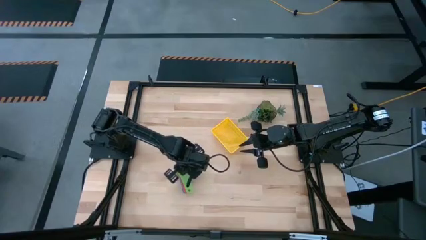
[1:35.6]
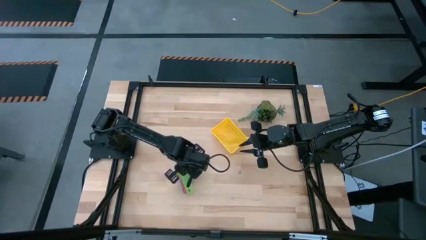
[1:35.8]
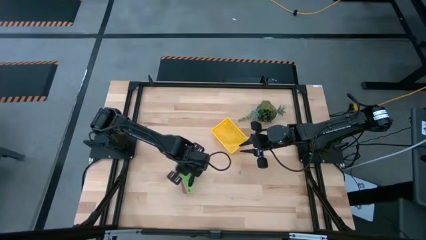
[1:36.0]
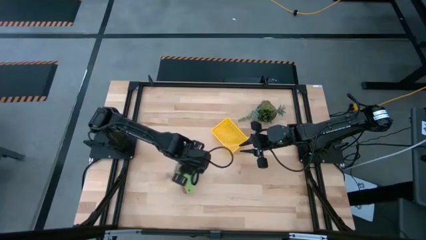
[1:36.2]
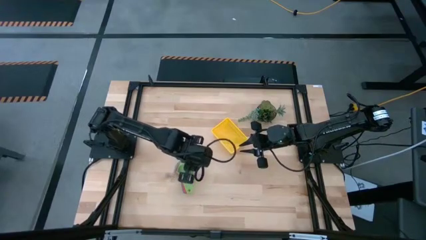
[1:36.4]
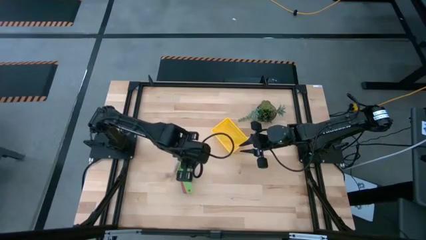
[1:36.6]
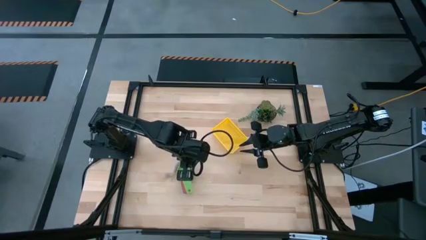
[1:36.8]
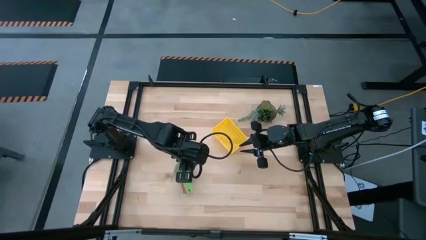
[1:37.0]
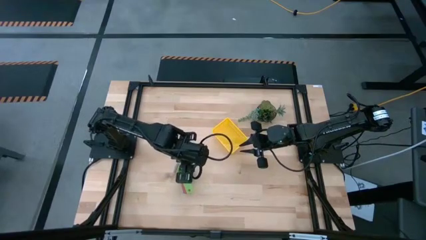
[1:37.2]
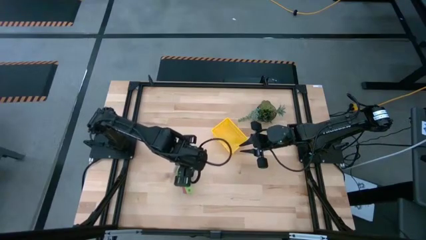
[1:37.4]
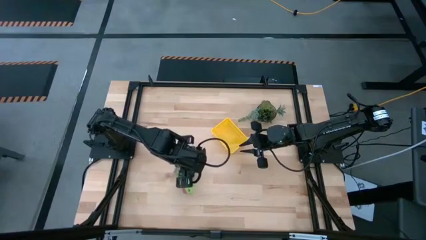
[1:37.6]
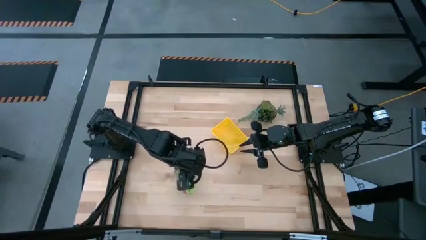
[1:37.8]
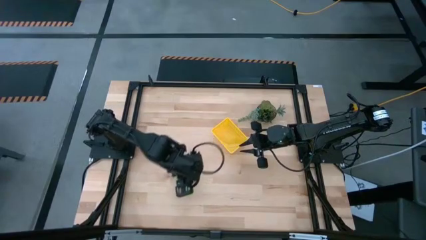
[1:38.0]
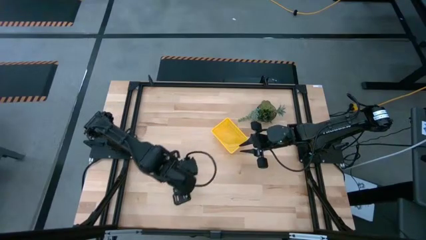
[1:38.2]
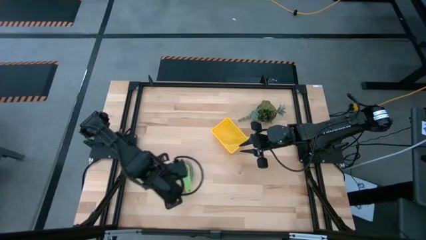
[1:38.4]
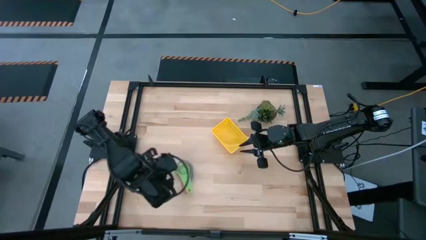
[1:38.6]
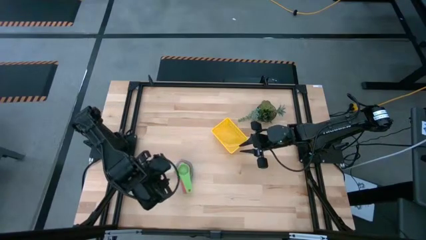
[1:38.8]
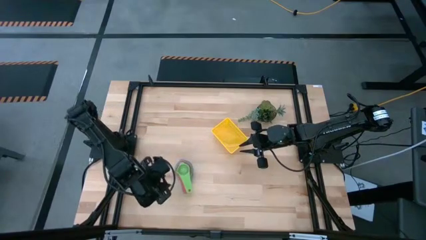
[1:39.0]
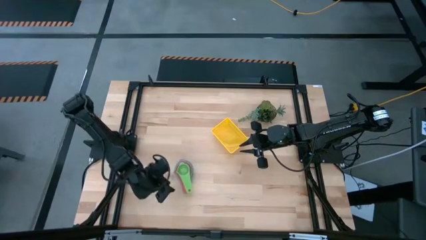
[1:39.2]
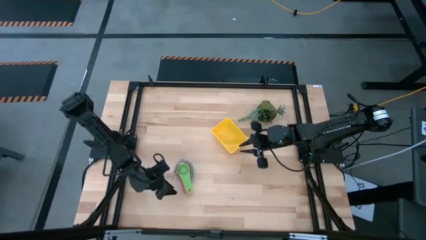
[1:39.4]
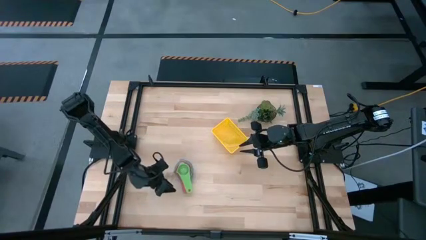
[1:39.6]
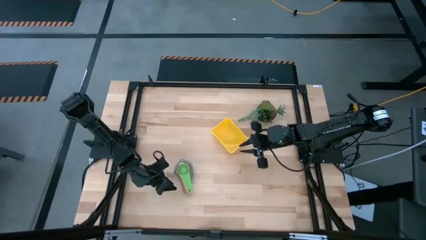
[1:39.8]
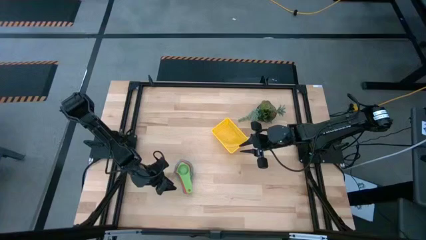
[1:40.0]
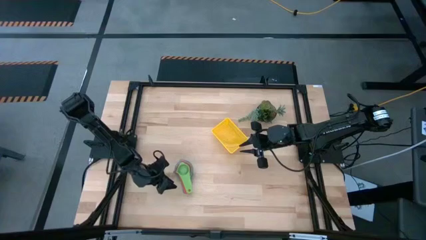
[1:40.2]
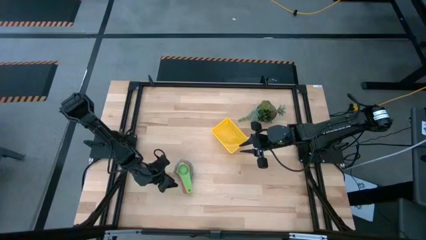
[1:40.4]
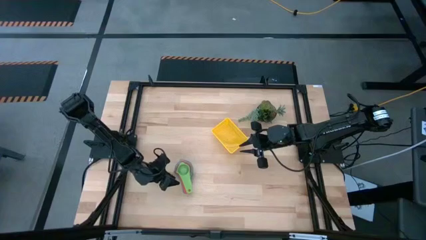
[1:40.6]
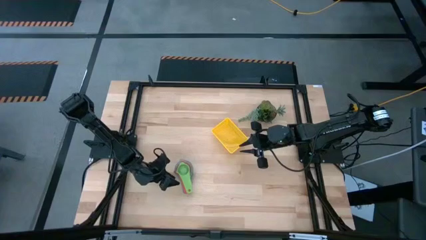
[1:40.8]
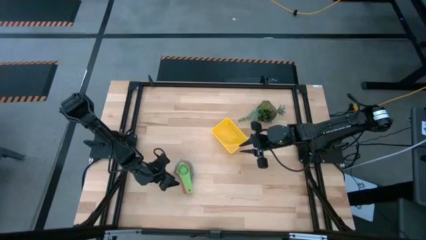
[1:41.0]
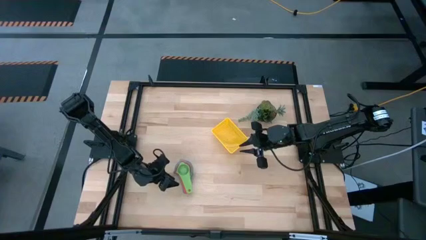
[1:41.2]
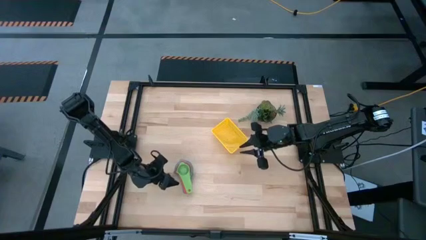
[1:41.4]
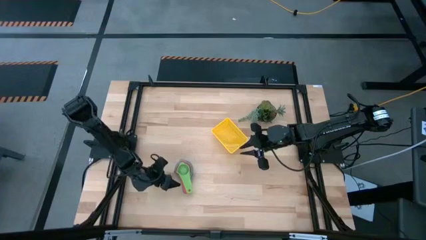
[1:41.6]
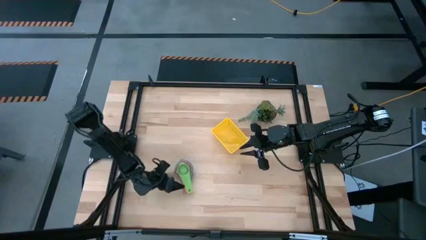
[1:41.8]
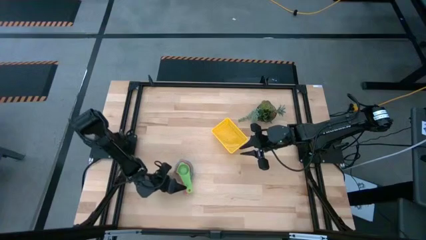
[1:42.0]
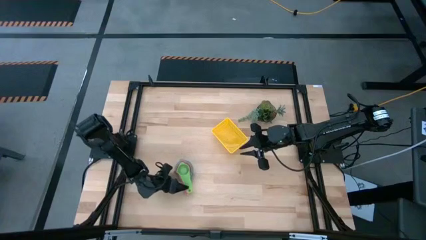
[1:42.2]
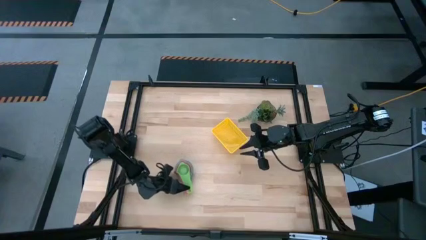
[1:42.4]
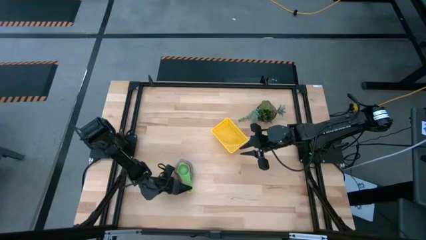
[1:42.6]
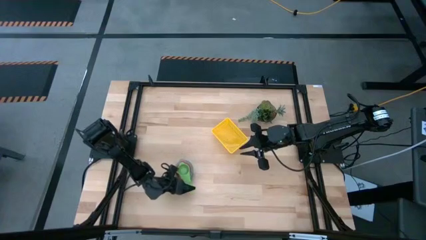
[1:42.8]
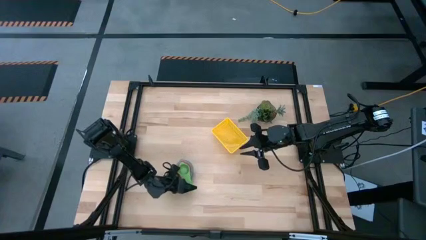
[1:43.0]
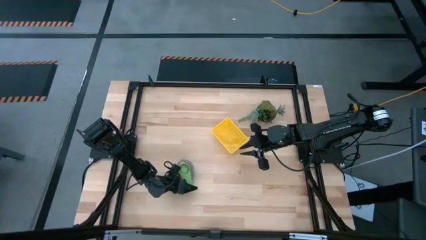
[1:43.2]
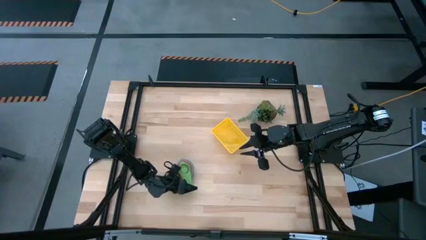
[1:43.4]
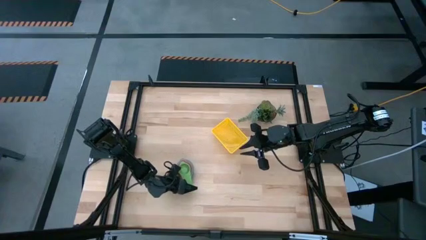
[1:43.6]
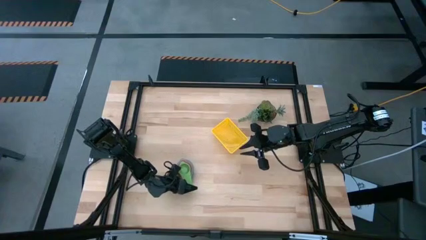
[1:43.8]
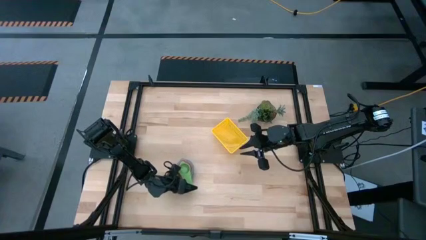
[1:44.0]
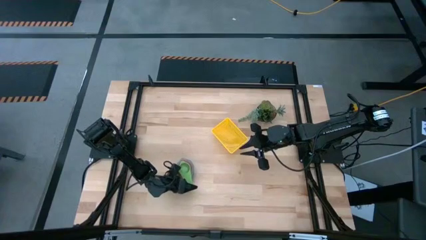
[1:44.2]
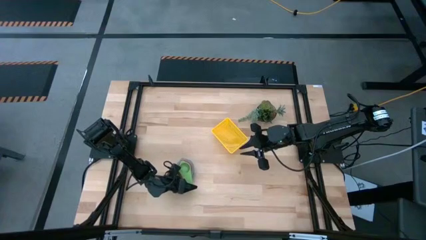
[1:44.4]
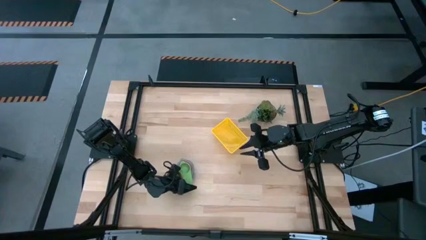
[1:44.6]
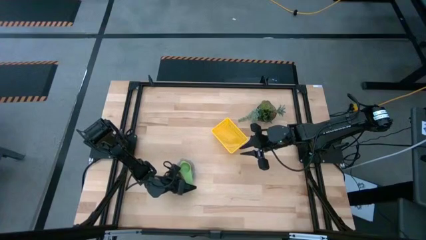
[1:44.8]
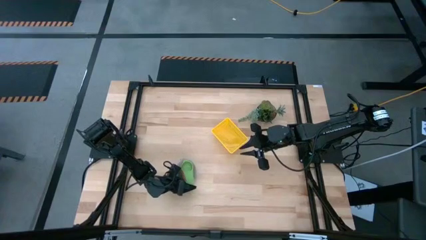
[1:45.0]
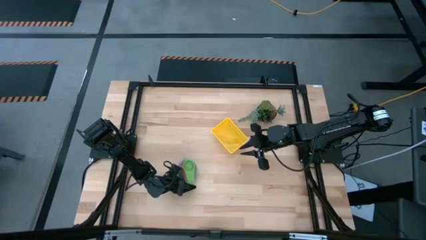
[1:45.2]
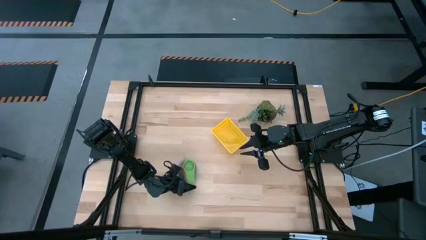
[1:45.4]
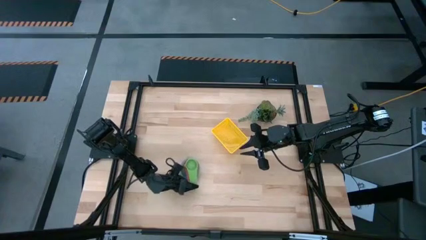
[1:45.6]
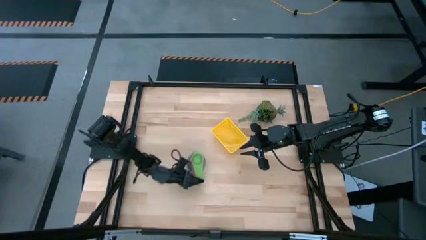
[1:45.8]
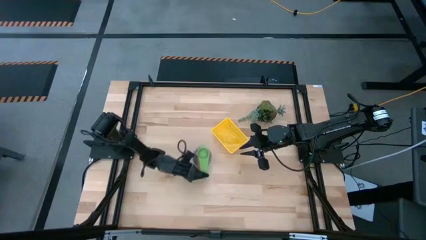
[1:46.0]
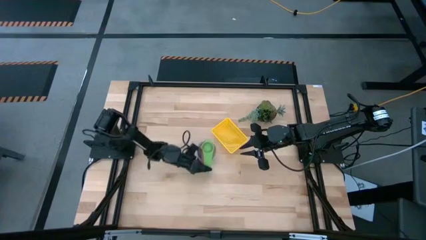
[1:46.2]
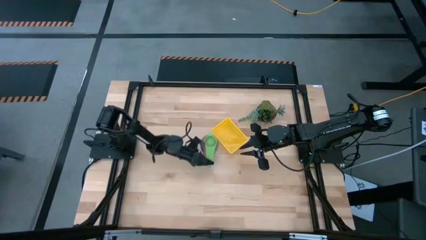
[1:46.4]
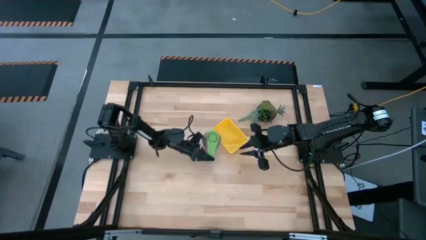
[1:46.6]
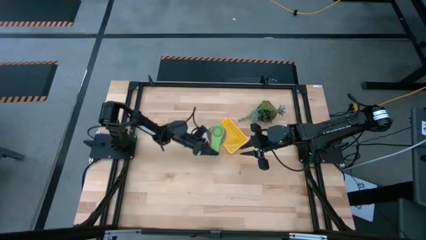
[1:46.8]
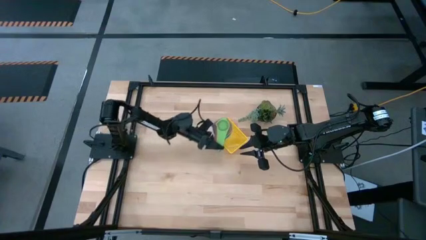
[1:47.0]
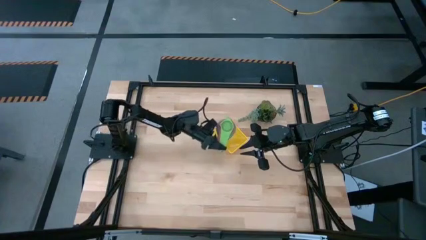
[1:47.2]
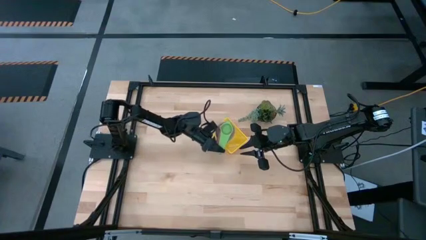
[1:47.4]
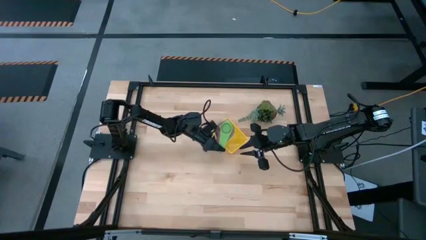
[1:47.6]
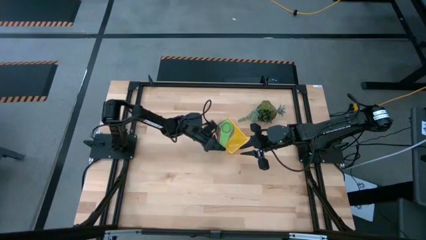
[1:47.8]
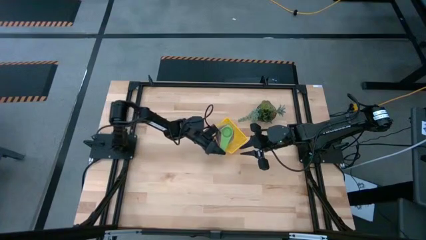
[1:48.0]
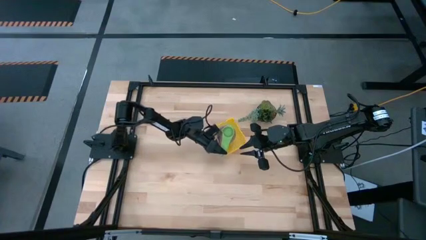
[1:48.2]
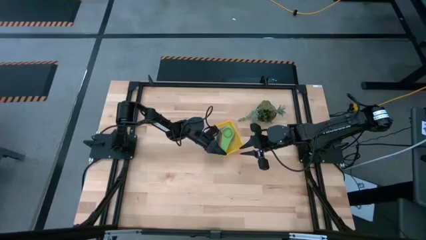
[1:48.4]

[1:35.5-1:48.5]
Task: Nest measuring cups in basket
Put the stacked measuring cups into the yellow bin

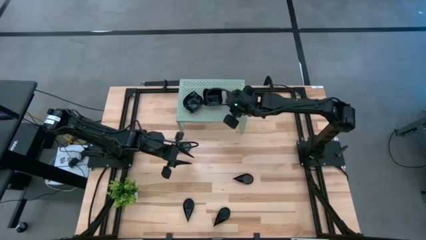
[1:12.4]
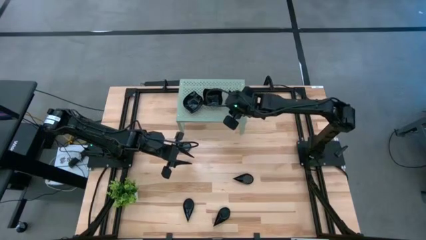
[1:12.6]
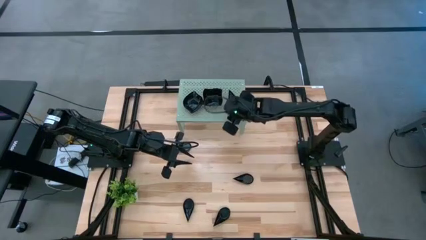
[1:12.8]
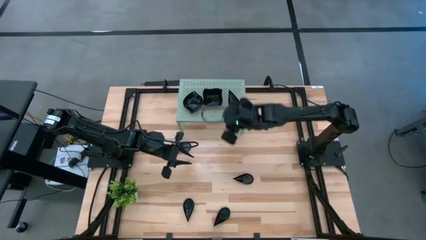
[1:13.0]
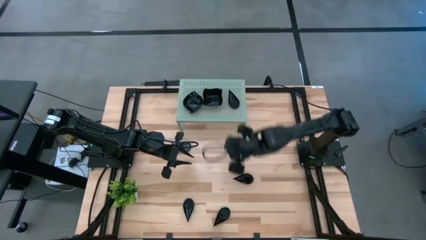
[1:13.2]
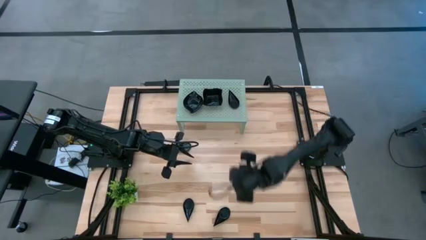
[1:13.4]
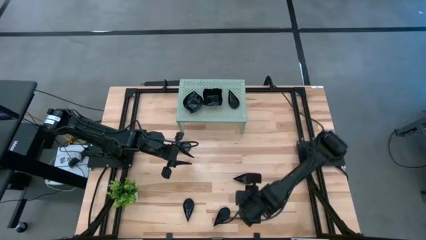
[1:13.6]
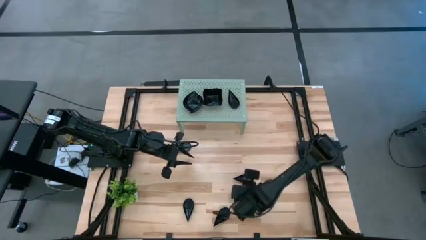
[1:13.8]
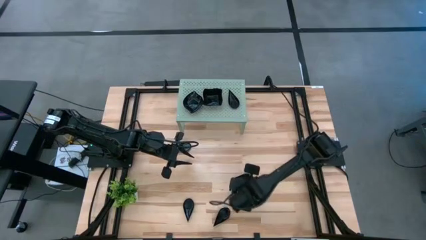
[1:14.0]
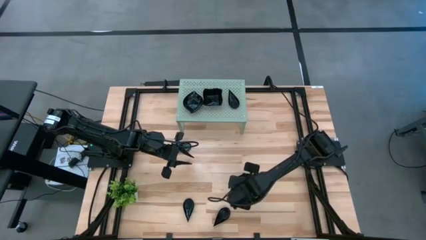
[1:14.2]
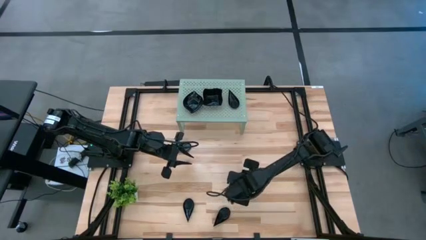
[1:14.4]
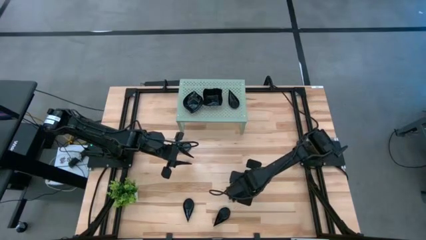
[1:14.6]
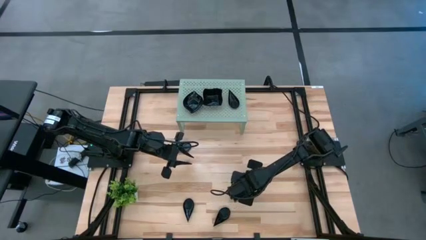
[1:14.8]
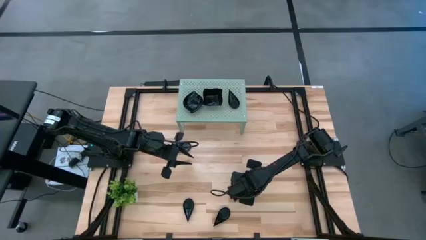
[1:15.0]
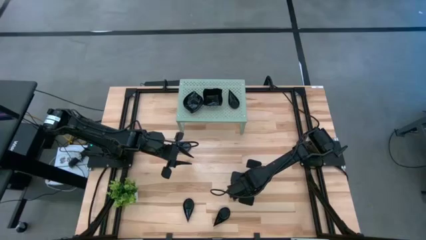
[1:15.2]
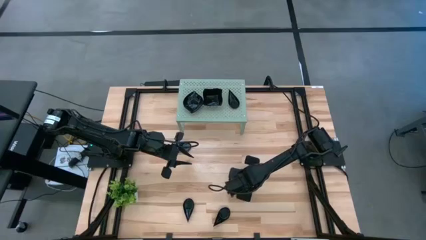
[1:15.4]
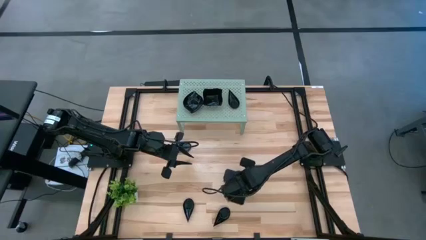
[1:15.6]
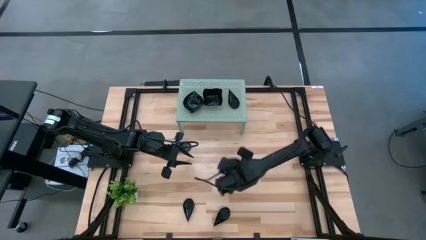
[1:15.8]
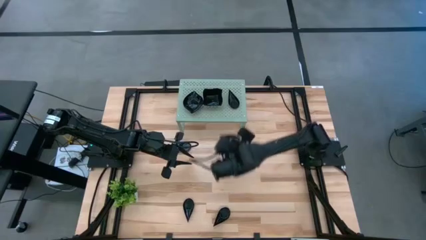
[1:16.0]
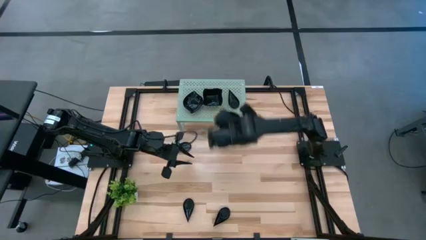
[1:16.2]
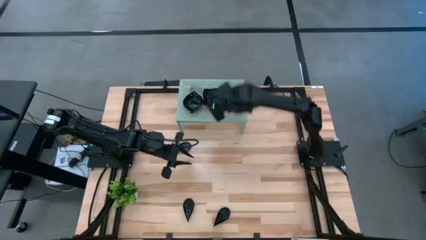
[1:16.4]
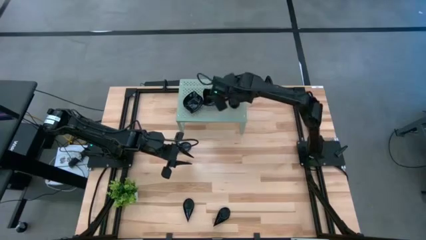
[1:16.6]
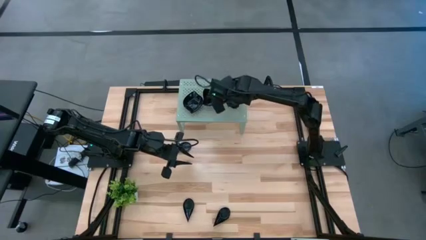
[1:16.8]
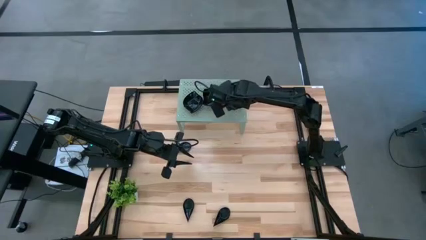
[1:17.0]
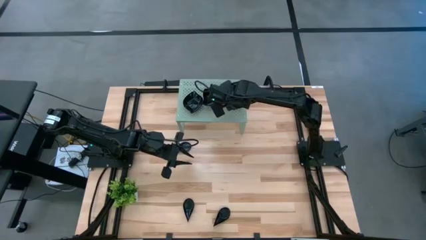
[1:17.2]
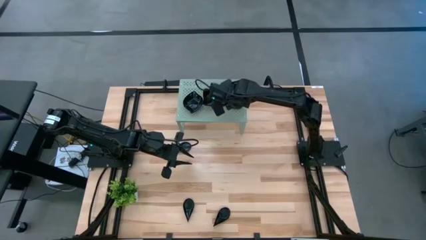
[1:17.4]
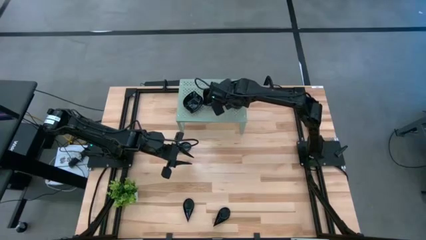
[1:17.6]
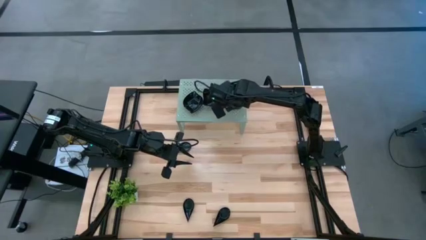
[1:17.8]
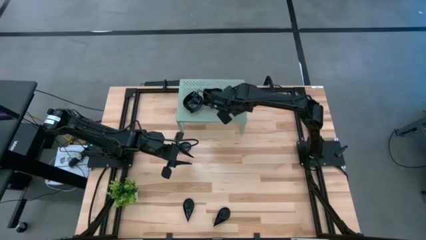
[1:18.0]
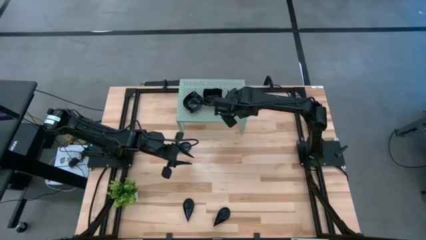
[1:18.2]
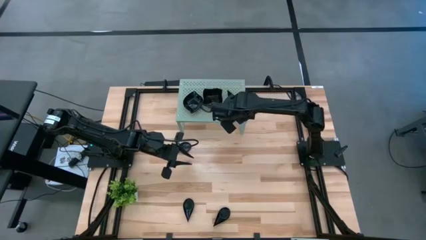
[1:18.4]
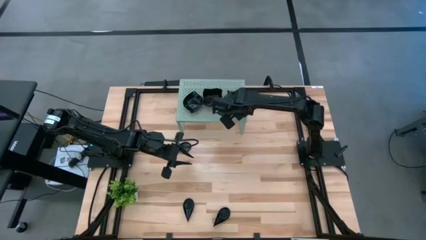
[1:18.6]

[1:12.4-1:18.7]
Task: Pick & Place Mini shaped plates
Stack the drop-shaped plate on top of the other drop-shaped plate on the shelf
